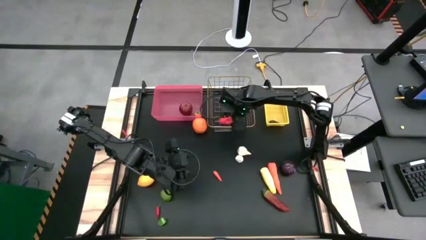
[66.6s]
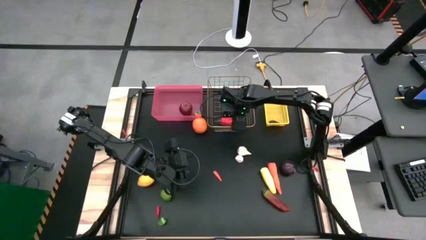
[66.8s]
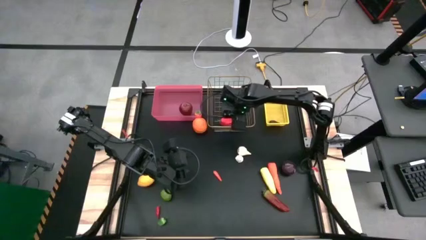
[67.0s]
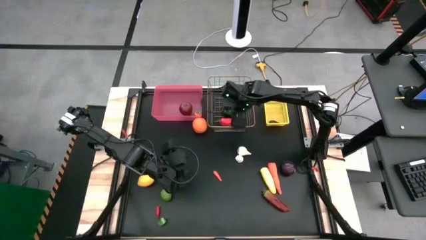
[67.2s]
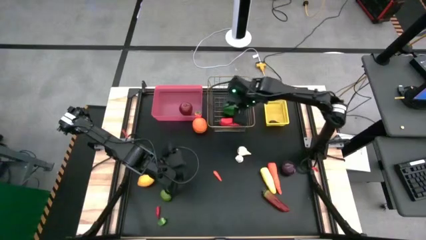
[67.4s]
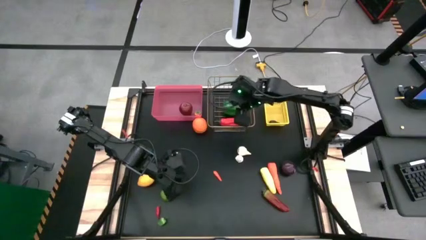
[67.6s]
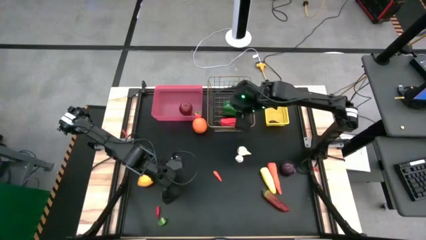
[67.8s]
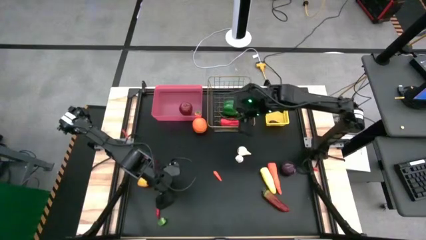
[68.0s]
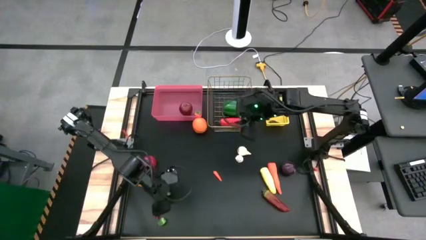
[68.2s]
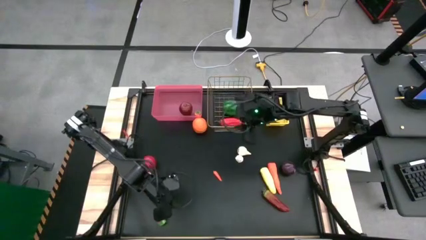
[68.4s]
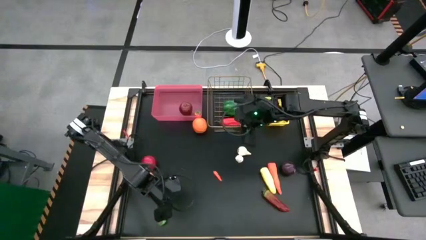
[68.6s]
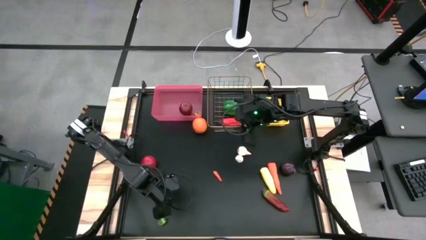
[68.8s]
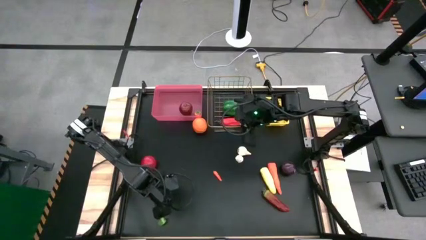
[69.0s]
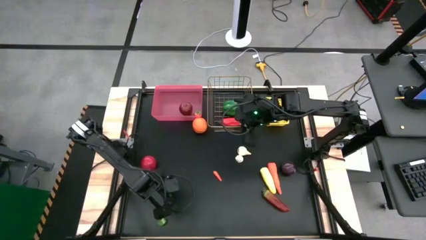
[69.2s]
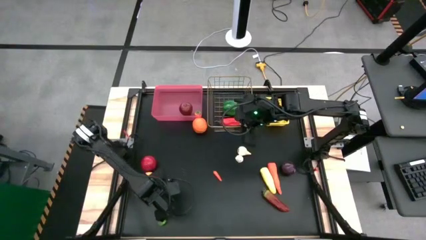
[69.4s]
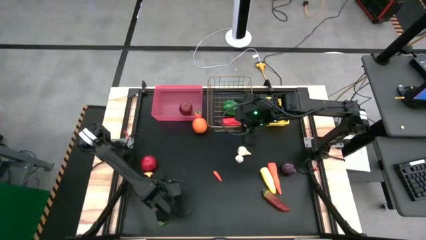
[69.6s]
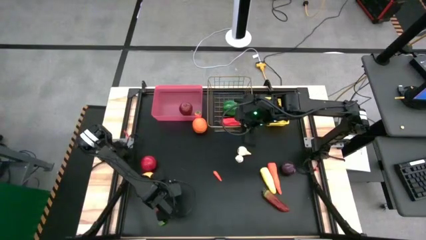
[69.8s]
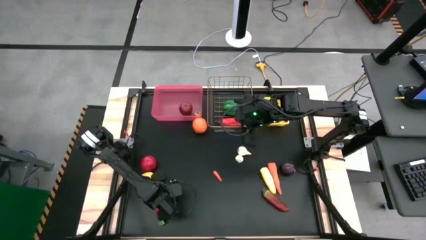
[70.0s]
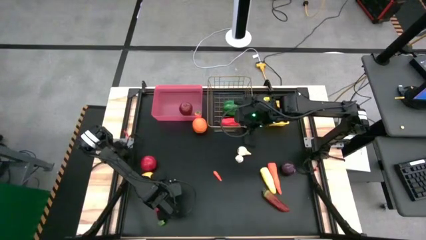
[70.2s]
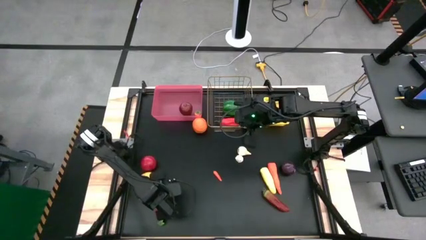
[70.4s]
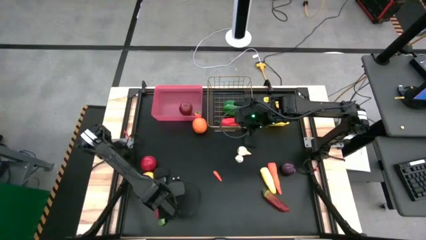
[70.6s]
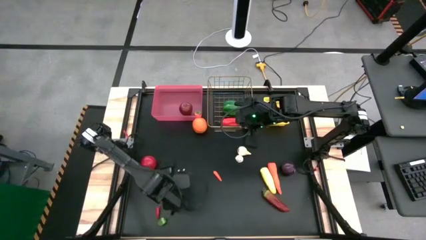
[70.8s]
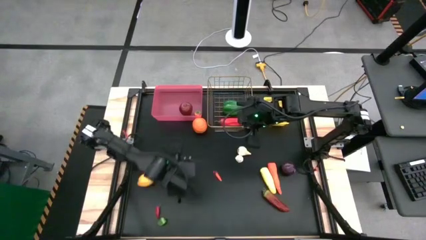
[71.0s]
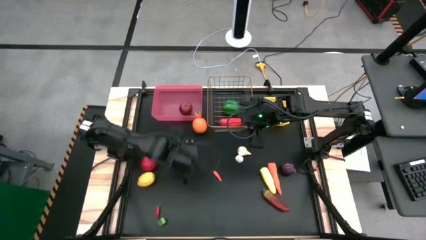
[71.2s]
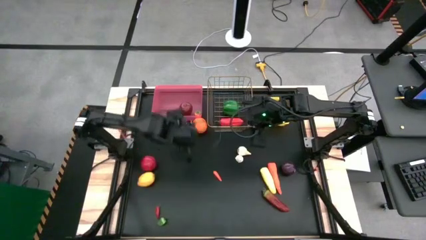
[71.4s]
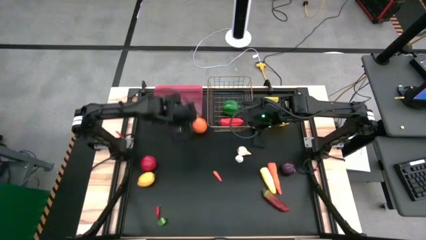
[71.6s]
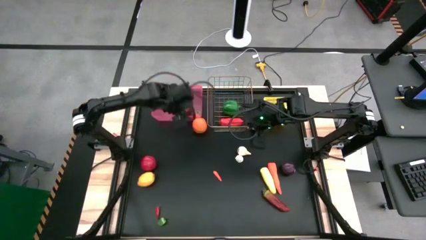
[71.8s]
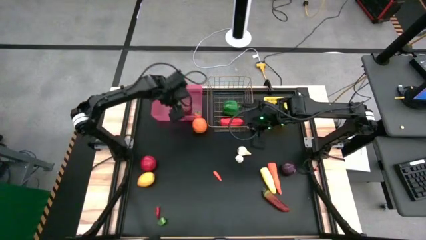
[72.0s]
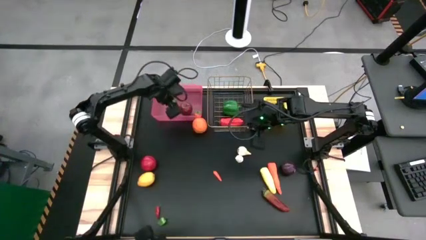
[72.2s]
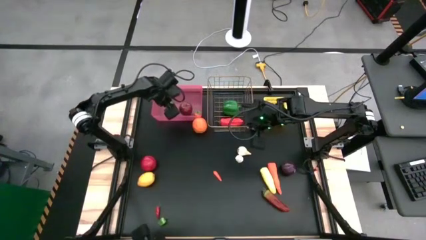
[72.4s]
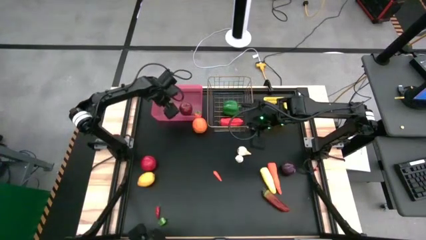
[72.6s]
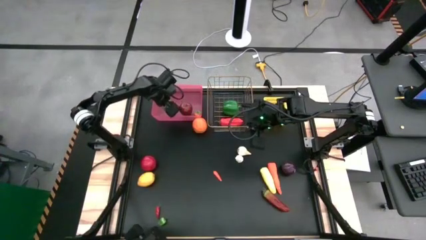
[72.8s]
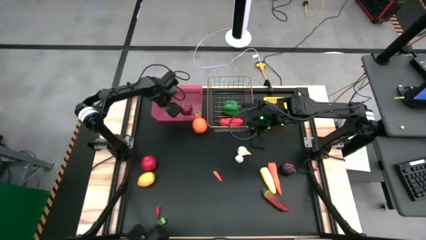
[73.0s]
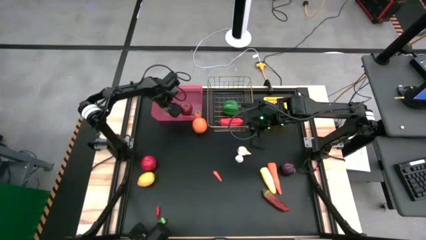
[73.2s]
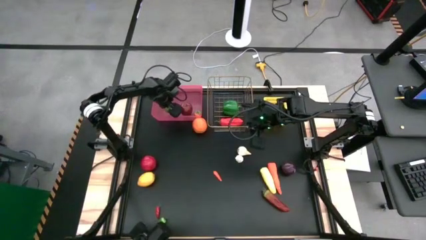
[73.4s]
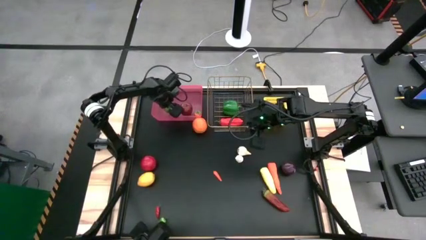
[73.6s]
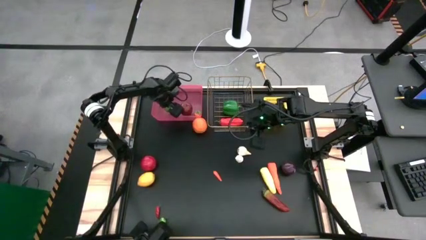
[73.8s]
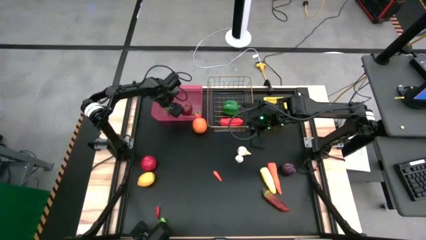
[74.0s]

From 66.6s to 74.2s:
Task: Sort produce into baskets
Put the green lime into the red bin

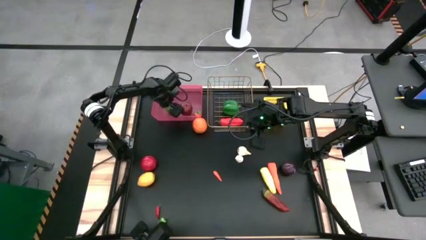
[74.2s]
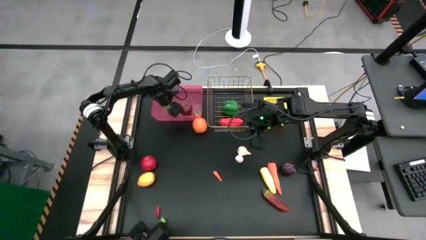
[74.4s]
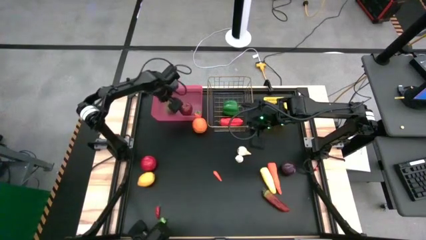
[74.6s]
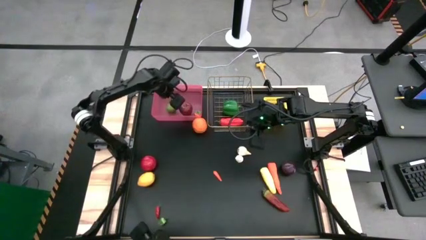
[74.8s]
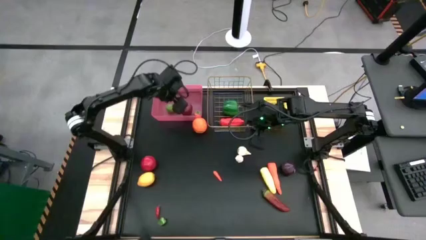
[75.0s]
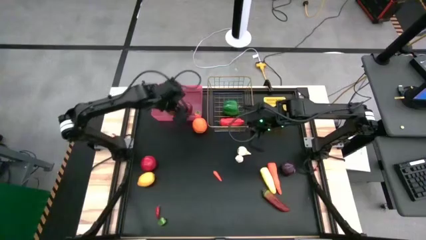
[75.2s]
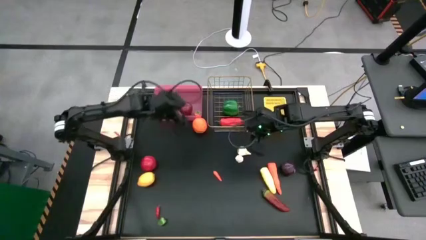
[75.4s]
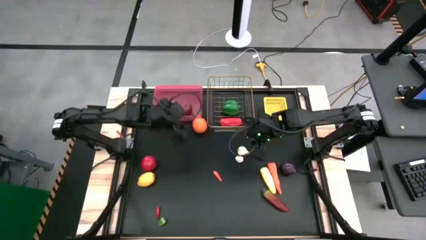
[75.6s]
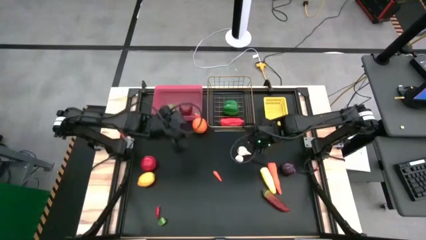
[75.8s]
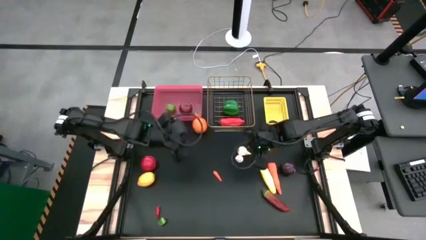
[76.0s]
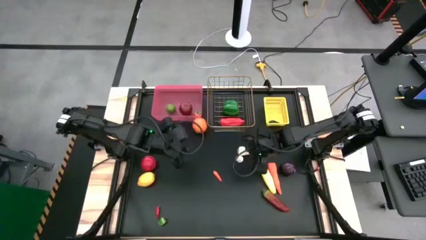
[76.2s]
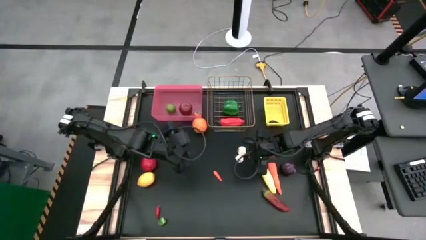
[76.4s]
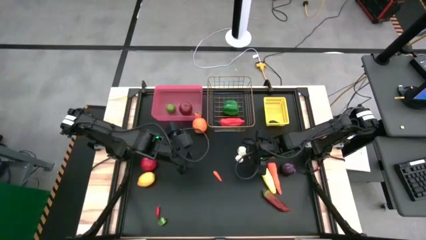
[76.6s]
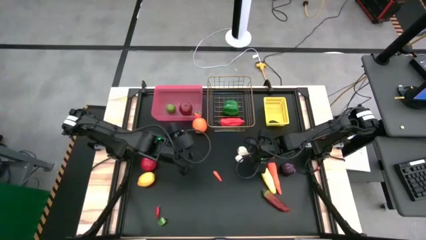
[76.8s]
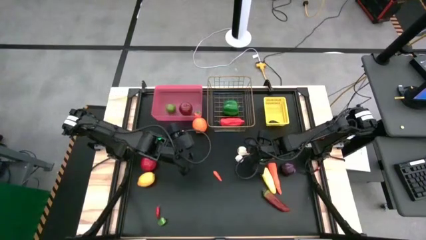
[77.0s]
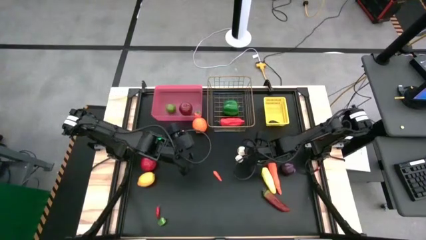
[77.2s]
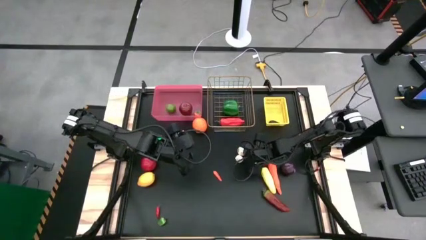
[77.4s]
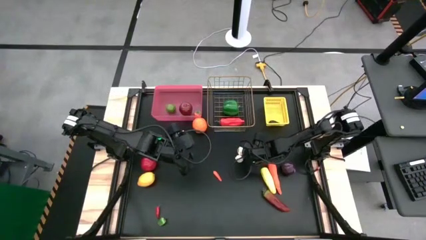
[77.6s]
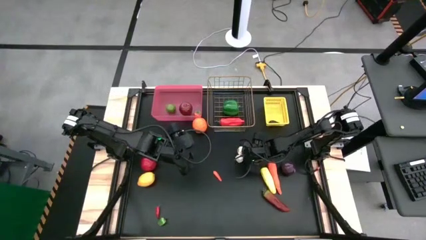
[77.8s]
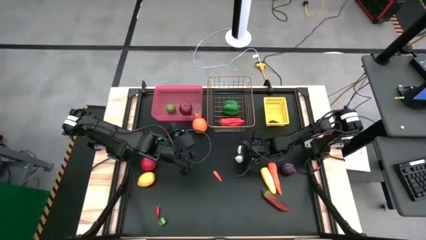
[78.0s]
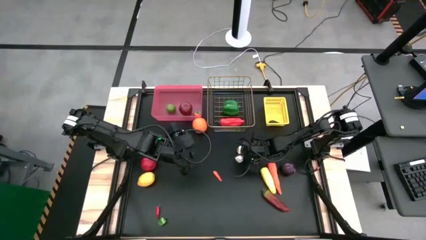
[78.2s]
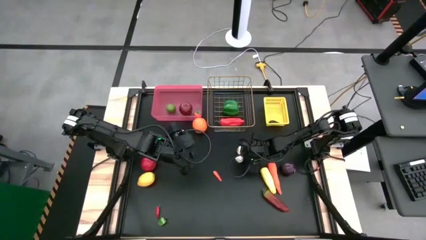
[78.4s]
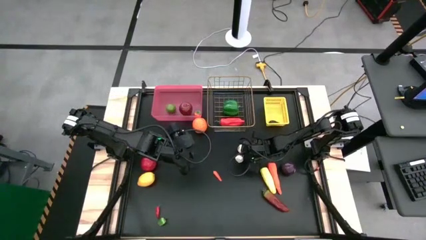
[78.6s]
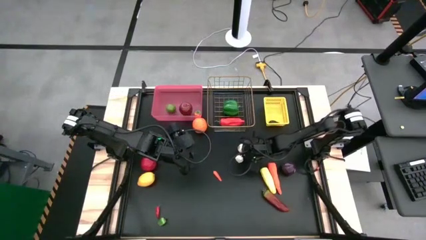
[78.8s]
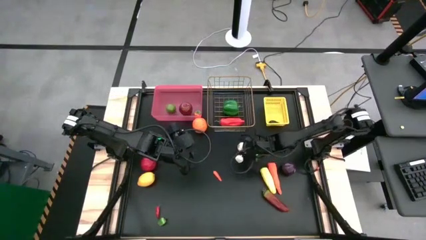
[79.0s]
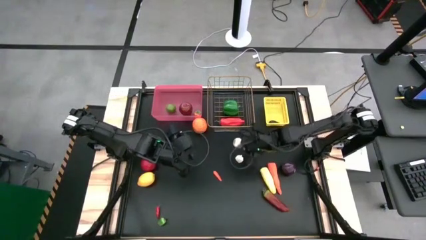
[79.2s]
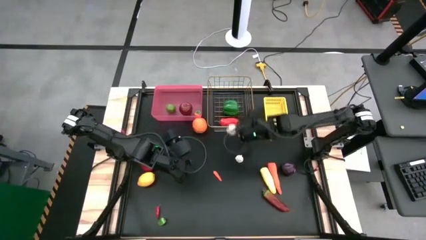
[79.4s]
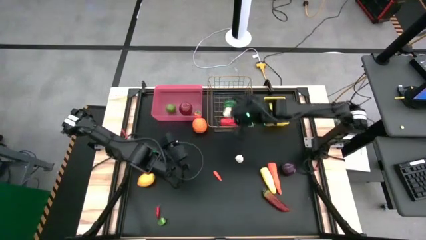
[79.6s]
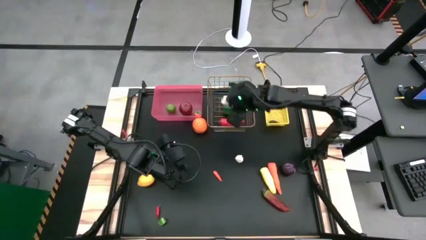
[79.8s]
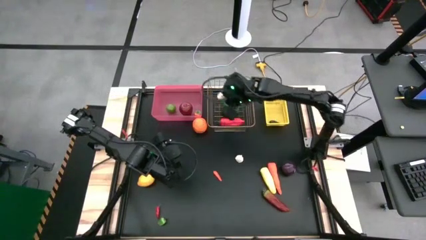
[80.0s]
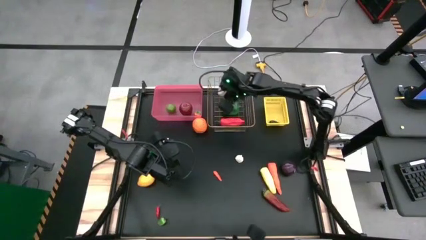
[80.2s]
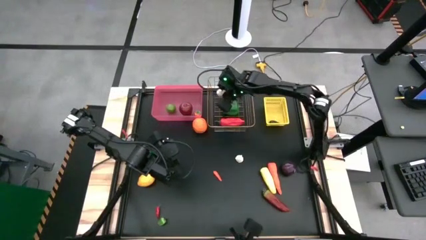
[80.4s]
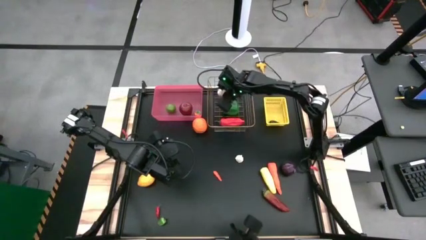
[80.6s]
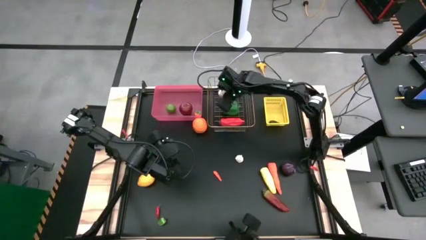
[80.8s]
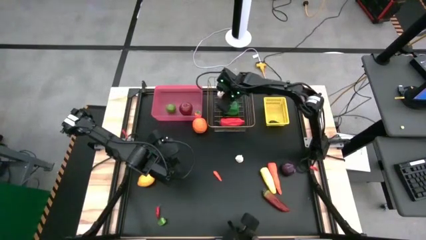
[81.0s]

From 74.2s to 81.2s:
Put the white garlic into the gold mesh basket
